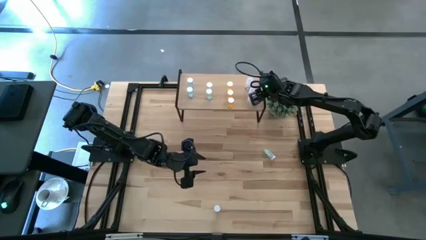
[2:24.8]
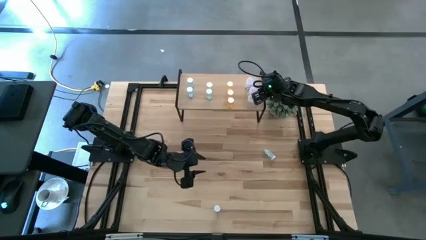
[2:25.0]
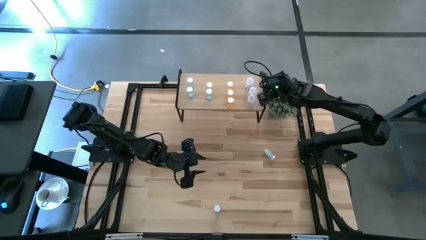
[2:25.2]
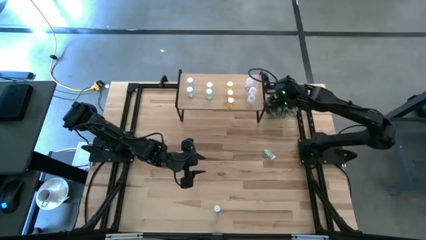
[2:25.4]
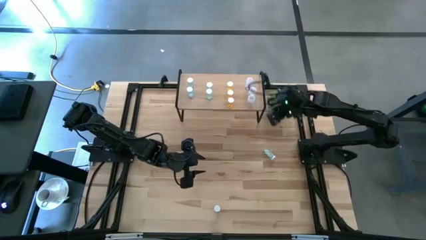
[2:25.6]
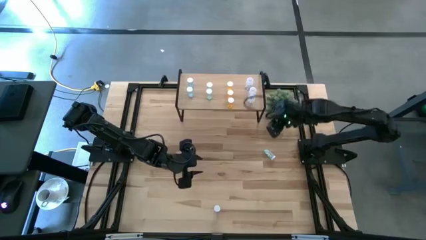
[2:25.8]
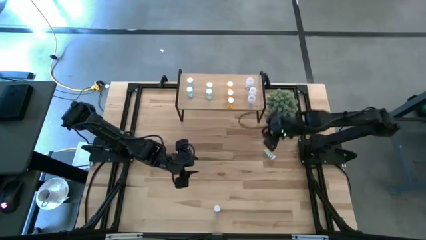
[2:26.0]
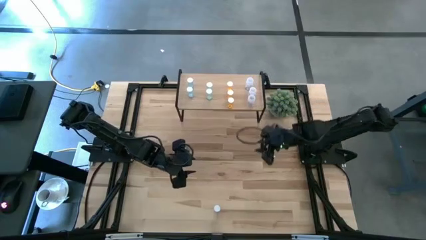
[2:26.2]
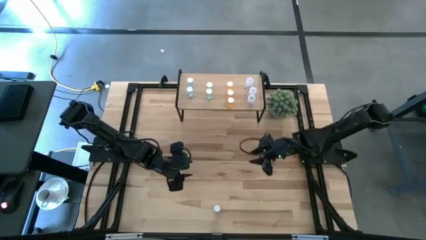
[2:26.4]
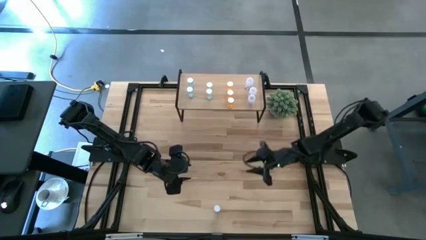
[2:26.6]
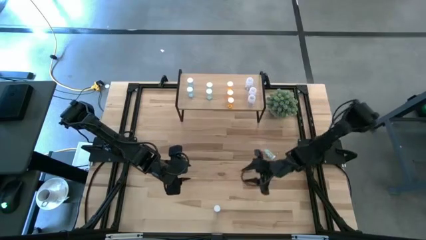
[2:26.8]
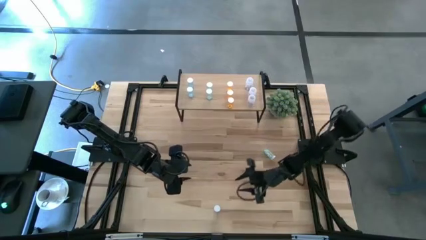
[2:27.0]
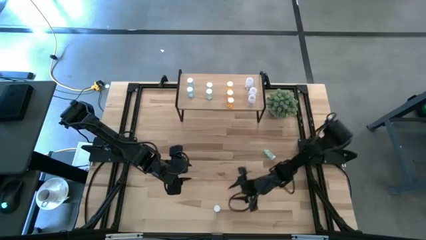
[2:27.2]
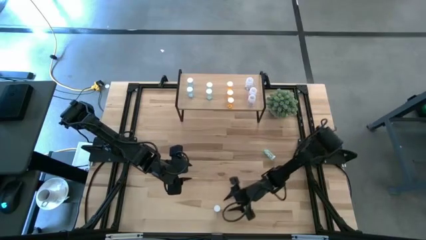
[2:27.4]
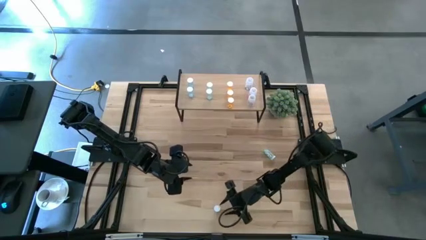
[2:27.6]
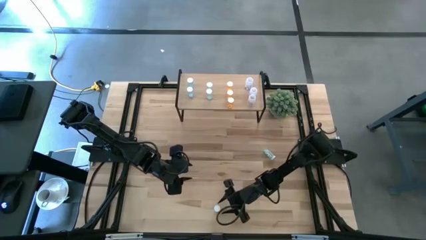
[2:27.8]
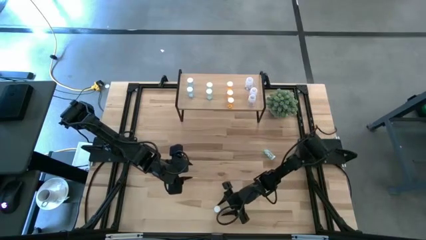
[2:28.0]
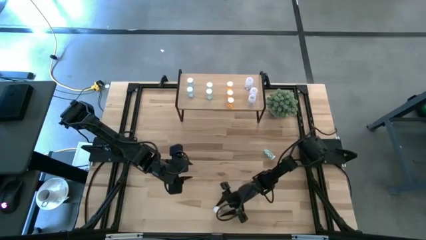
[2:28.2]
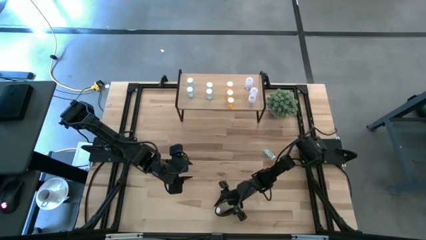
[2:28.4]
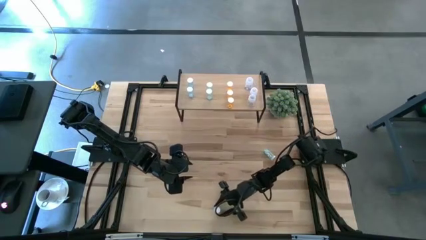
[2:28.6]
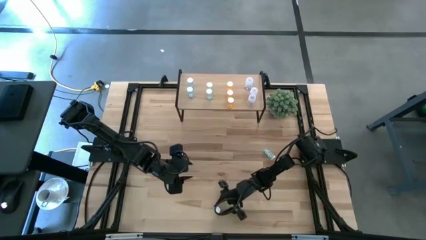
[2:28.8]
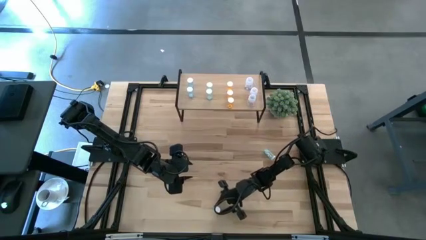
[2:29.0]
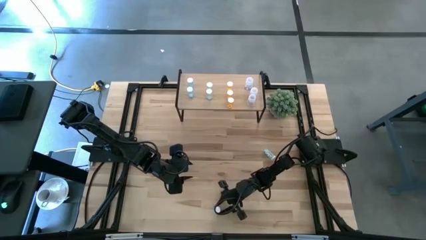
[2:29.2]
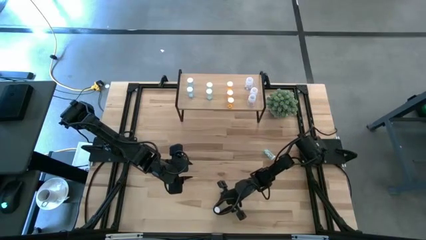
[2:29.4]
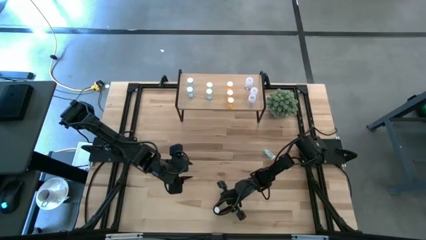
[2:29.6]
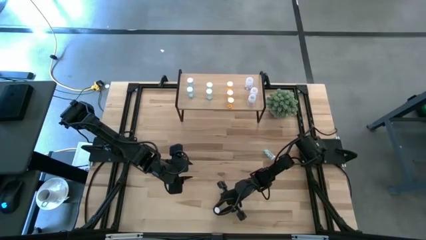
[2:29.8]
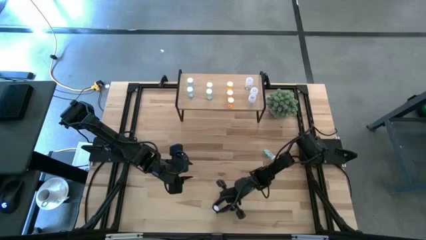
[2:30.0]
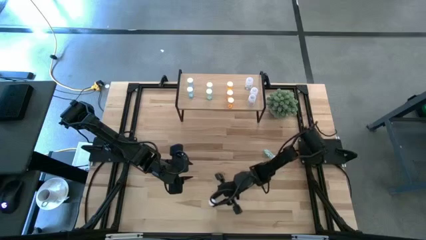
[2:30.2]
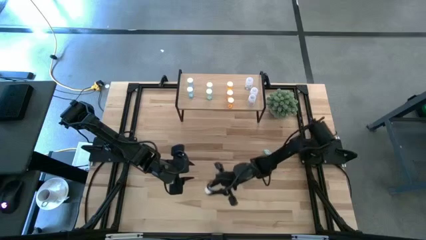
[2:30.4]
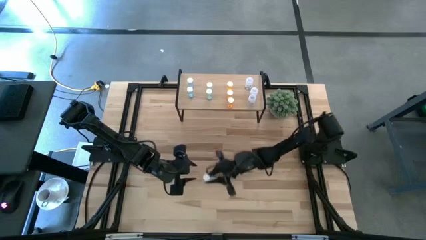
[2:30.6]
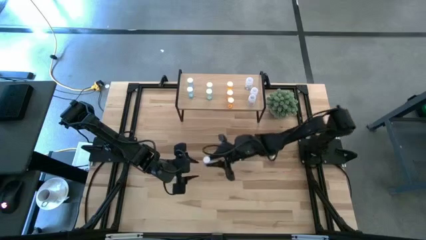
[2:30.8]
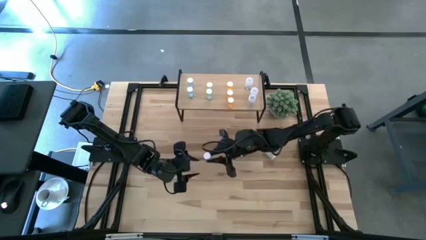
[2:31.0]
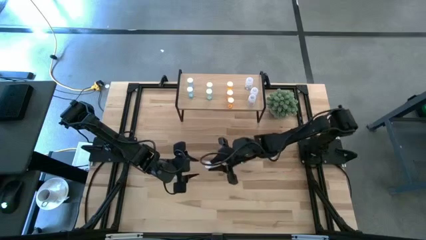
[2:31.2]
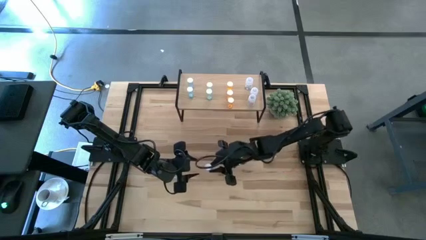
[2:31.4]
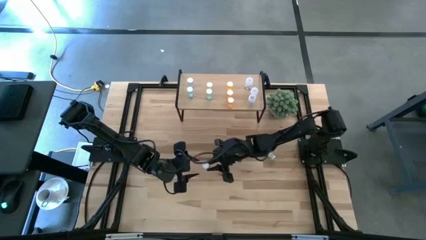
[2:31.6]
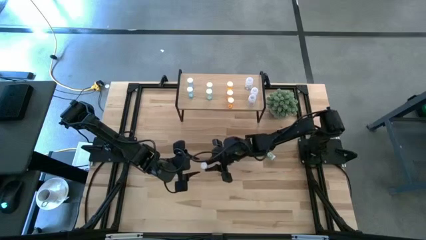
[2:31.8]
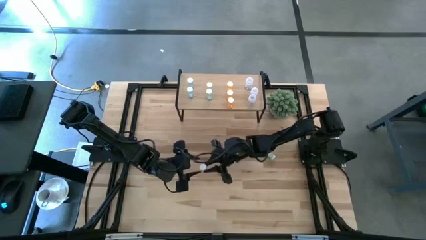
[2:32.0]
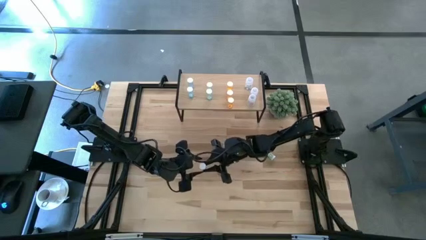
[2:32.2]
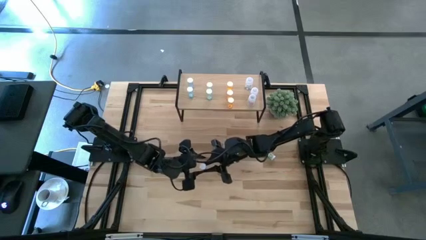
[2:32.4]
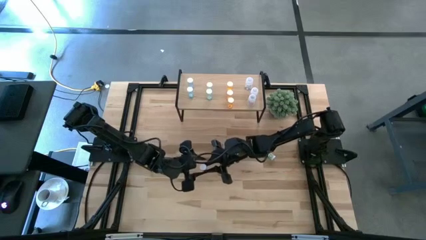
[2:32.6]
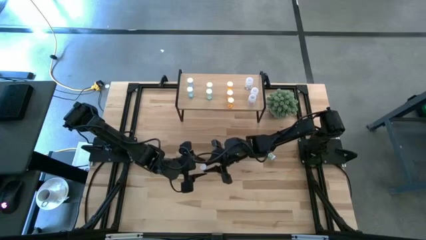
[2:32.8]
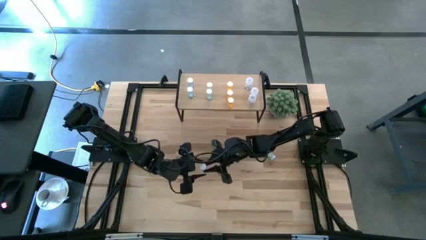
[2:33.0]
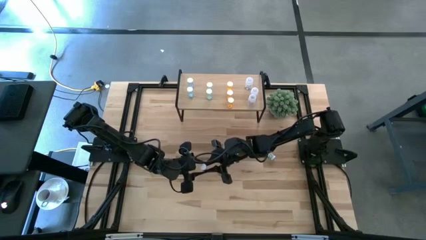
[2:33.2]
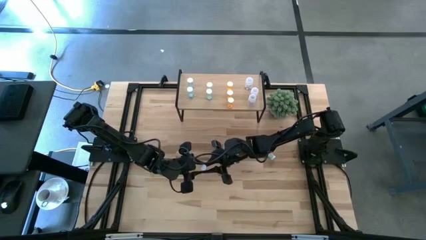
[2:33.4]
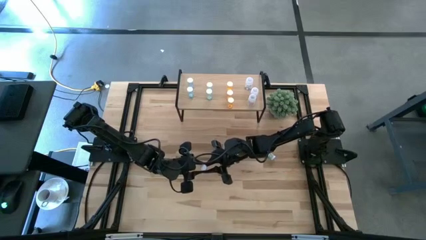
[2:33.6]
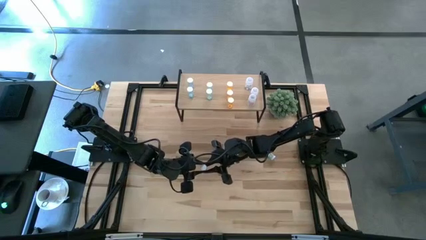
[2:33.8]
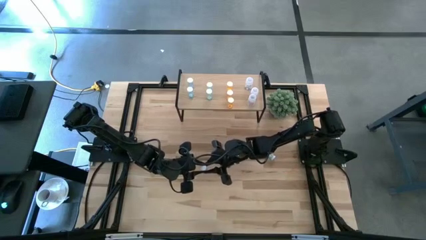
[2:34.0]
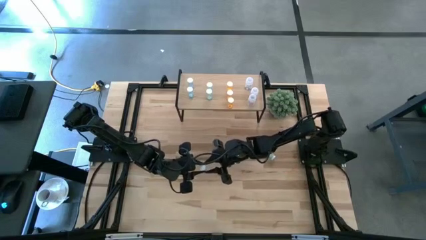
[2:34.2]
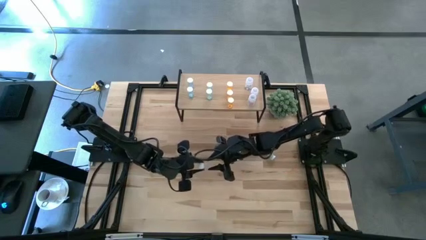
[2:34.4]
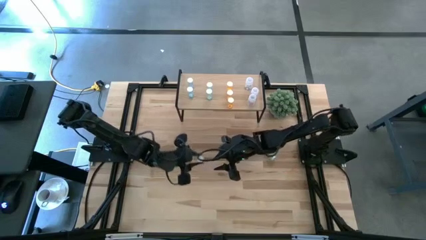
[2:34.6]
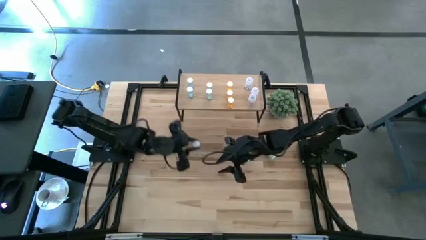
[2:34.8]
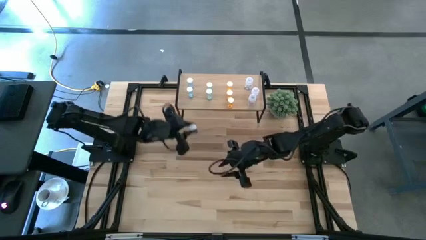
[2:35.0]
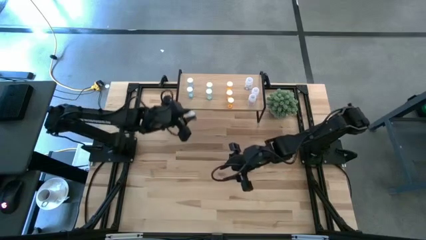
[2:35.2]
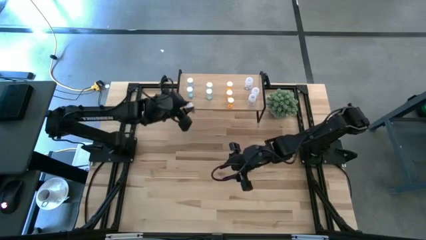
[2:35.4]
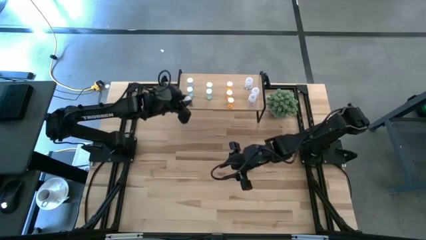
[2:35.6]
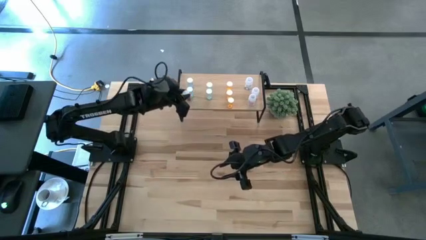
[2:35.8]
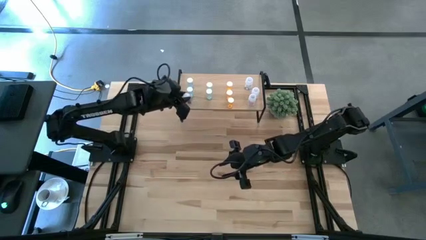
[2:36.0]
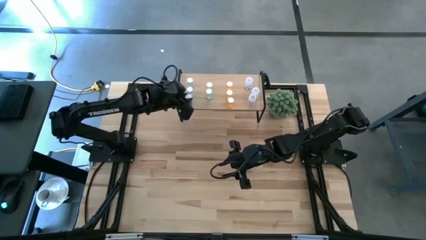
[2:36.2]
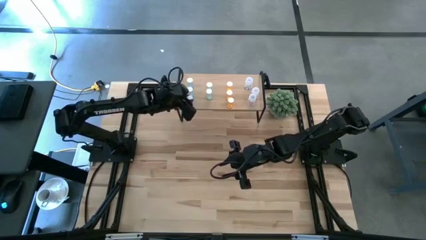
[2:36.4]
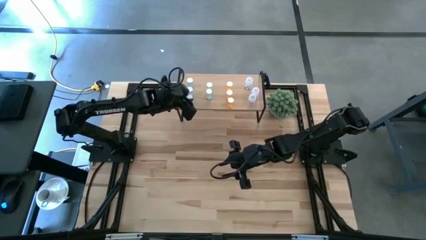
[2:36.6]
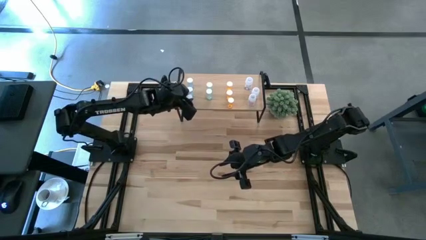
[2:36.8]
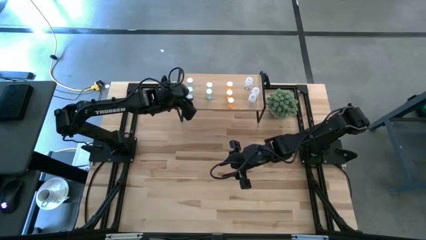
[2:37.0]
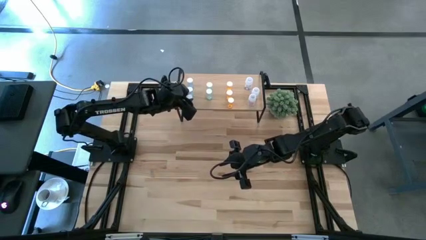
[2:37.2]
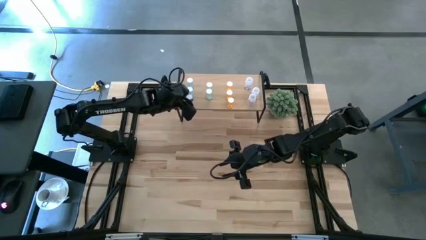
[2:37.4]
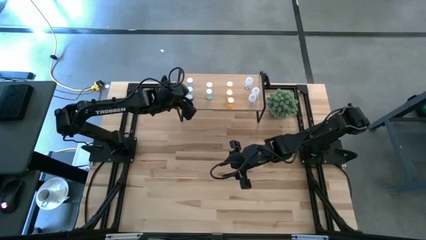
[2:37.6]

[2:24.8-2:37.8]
Task: Pick and place medicine bottles onto shelf by color
Put the blue pill bottle on the shelf aligned with the other blue pill bottles

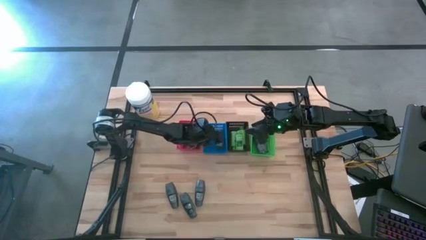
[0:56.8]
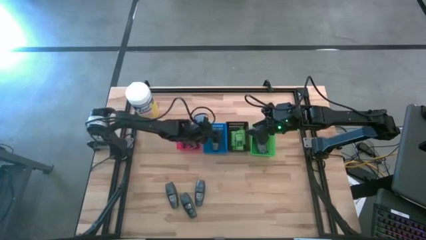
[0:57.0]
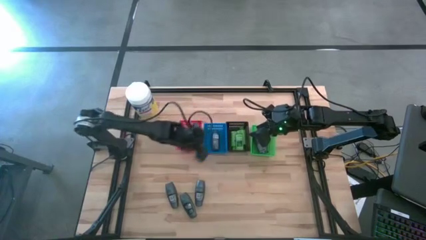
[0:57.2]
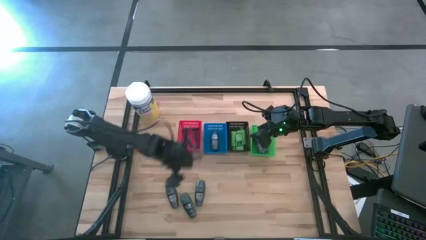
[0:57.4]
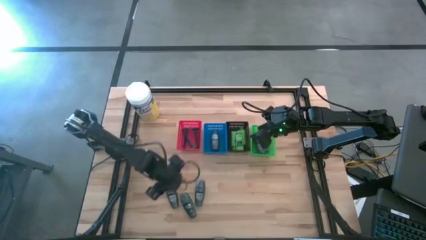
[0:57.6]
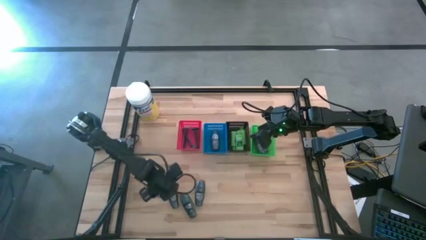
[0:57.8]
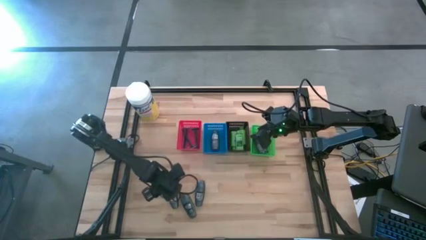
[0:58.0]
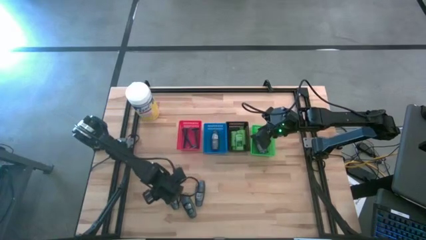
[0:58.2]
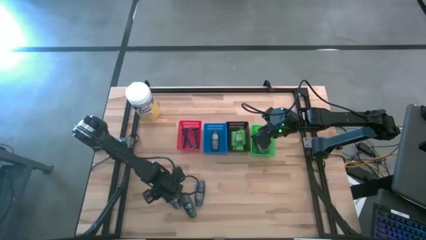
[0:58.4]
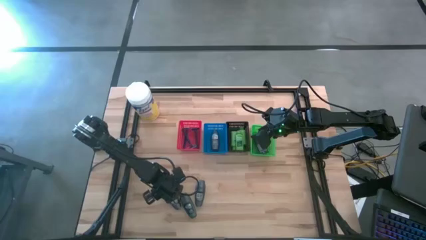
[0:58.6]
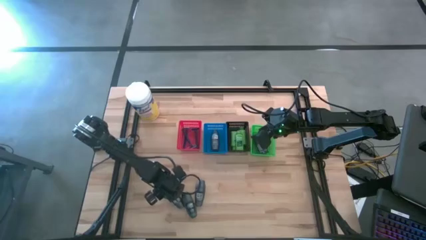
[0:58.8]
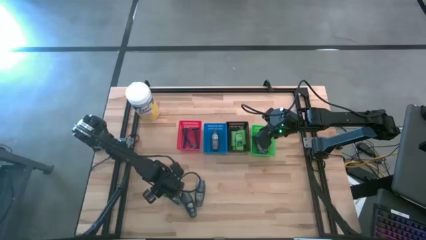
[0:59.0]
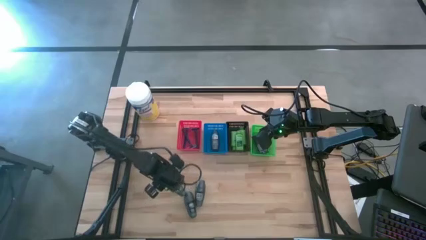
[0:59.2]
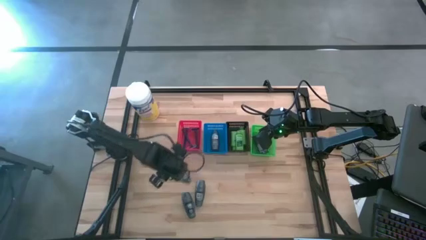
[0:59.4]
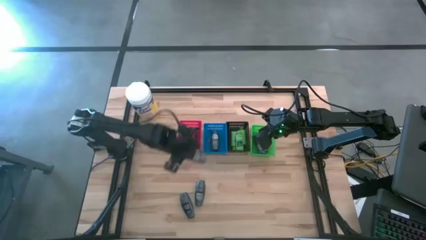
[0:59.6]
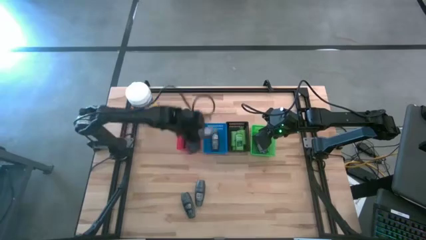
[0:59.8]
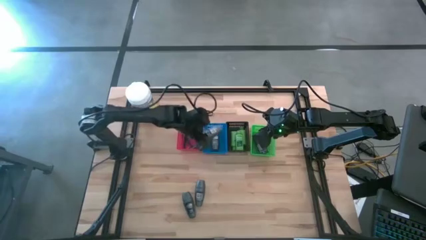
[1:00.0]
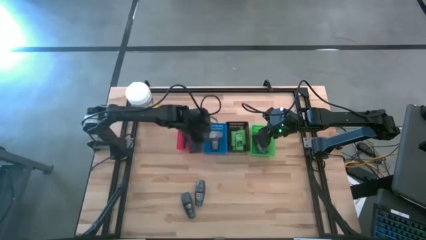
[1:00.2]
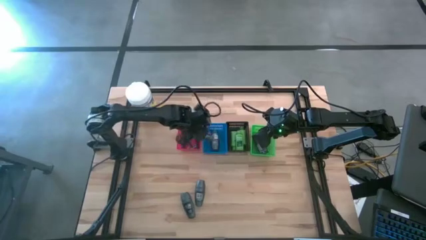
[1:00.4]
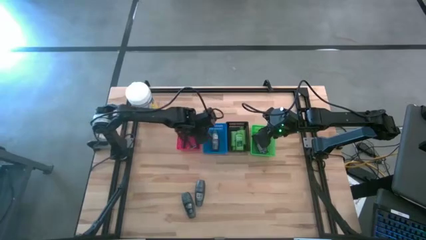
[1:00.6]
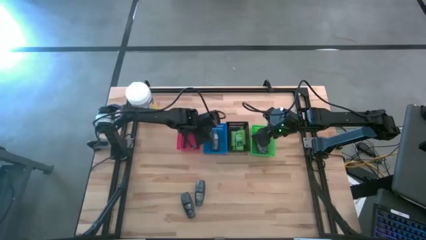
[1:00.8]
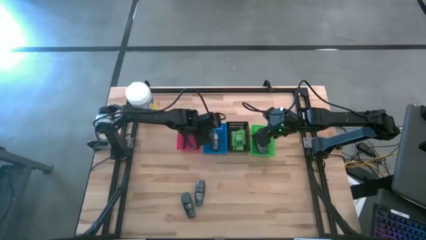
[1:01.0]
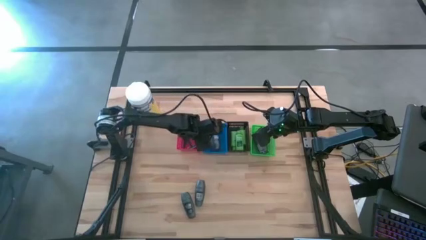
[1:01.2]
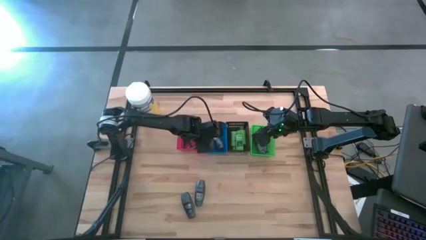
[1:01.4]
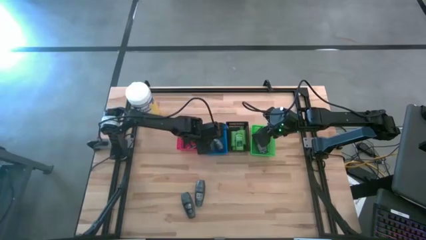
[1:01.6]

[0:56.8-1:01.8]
Task: Pick & Place Travel size toiletries
Put the deodorant into the blue basket
